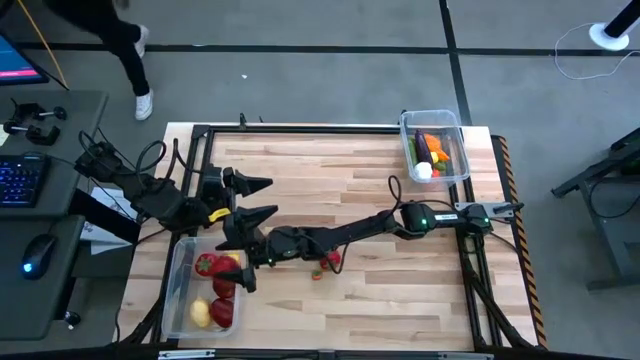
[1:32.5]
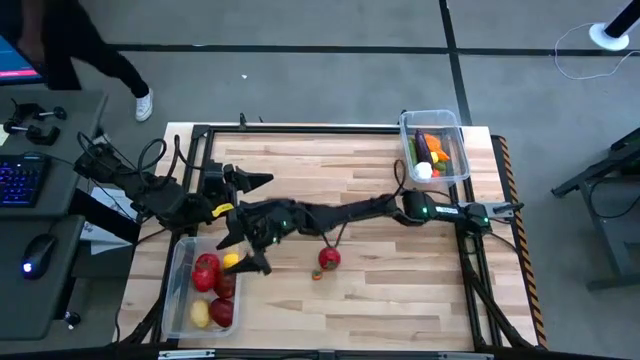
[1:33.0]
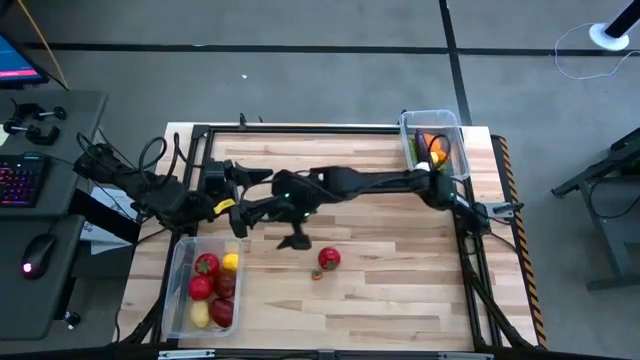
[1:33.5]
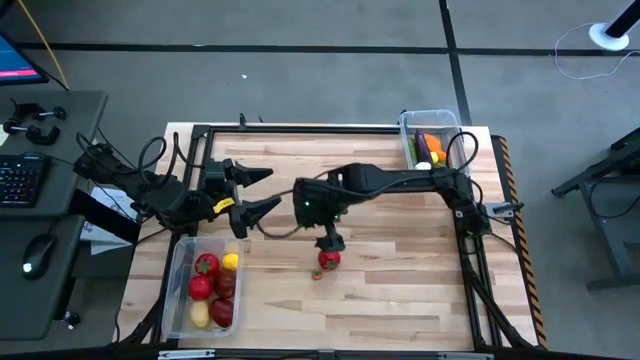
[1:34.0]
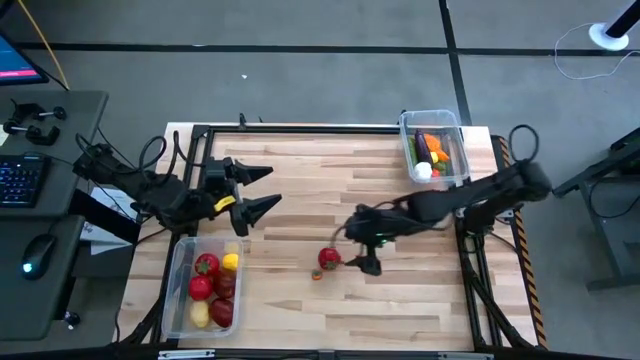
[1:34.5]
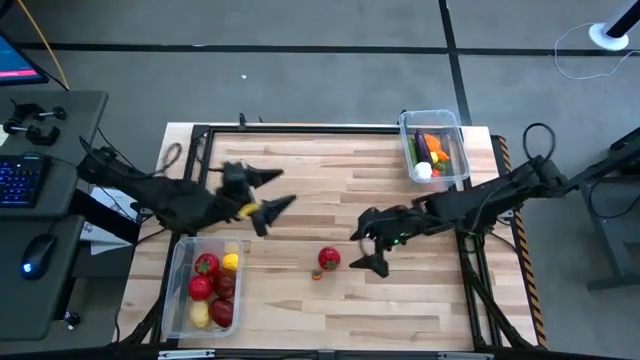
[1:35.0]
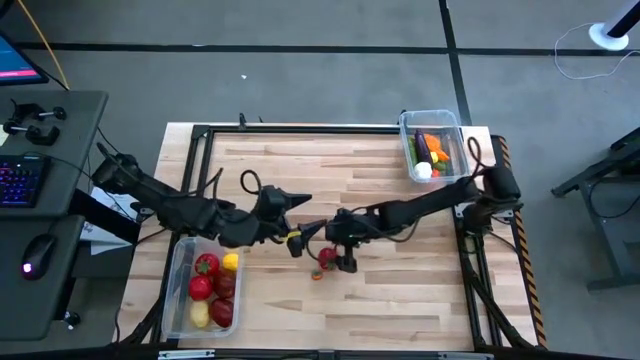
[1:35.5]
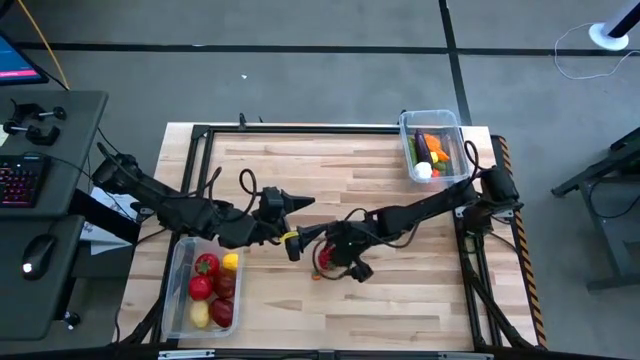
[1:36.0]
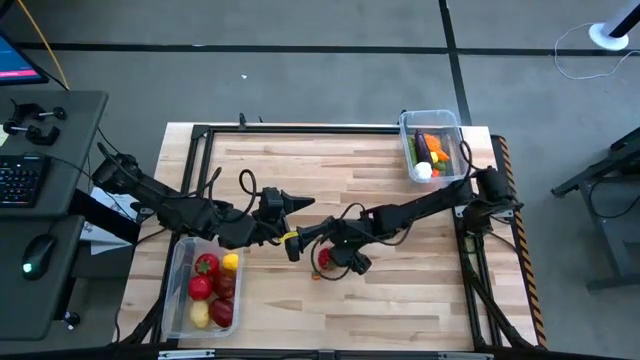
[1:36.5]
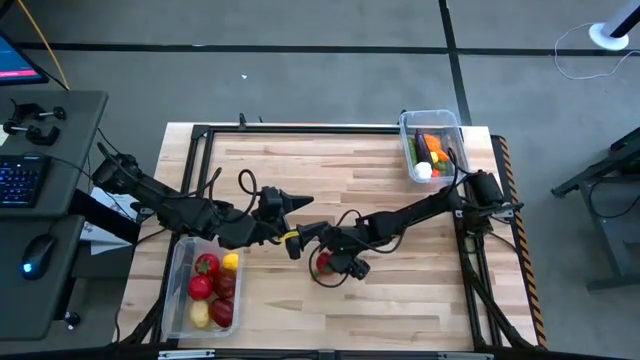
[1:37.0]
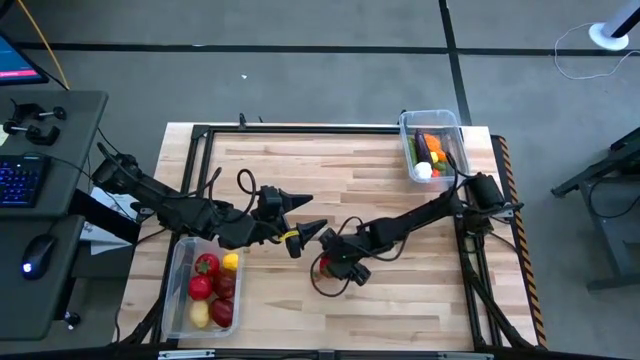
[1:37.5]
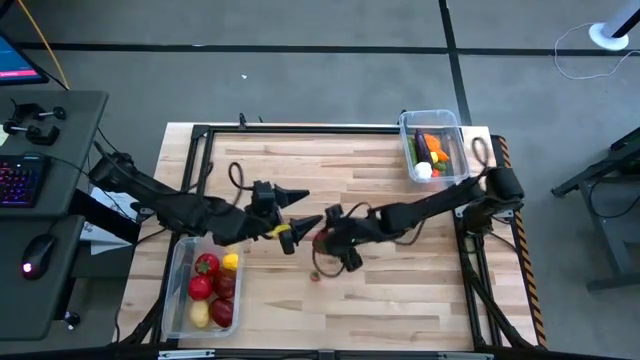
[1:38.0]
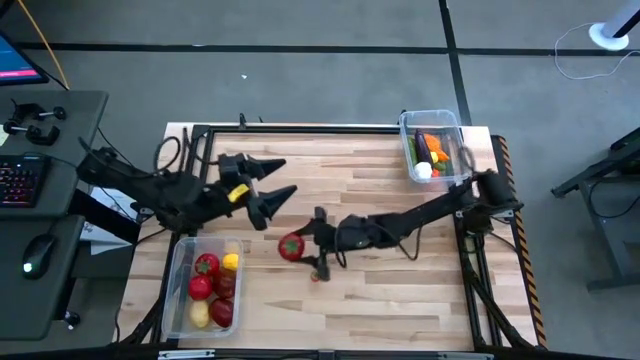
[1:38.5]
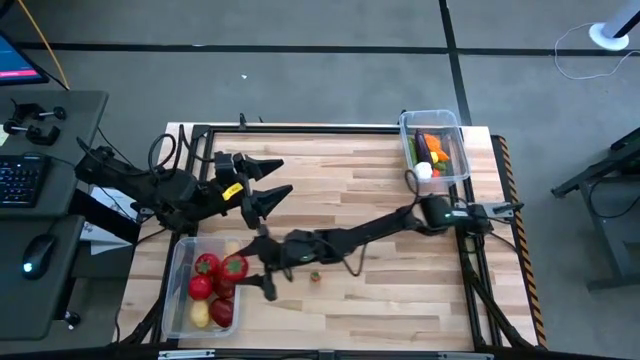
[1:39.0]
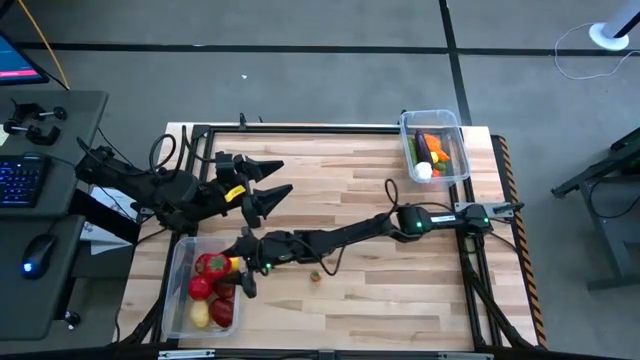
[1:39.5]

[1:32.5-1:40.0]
Task: Sort produce into baskets
Put the red tomato into the bottom transparent bin

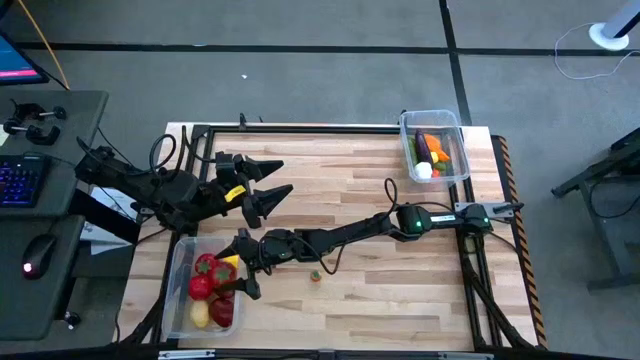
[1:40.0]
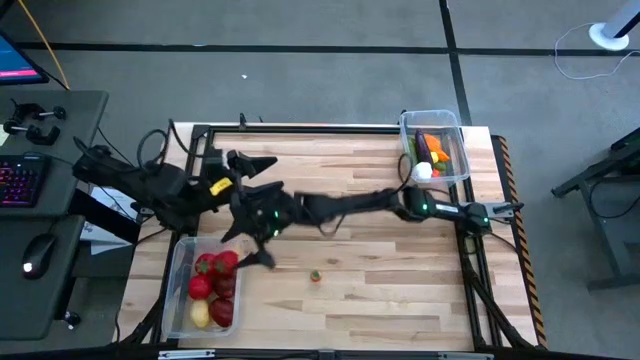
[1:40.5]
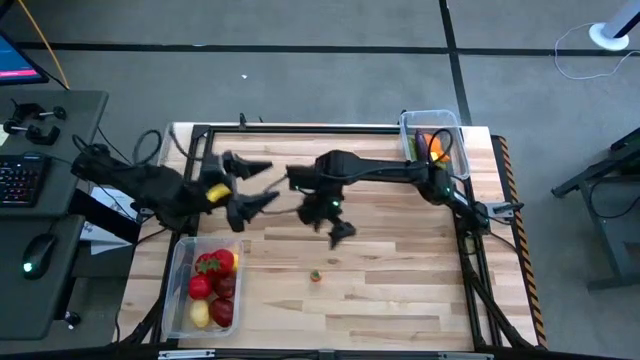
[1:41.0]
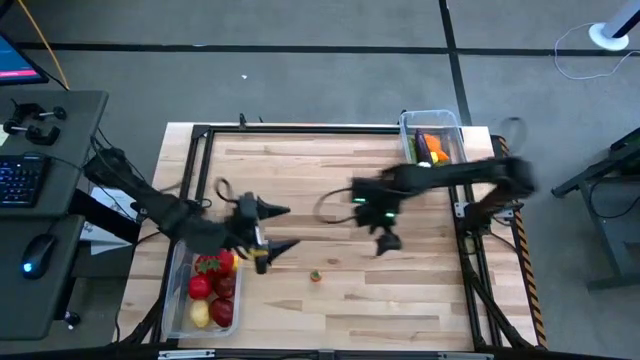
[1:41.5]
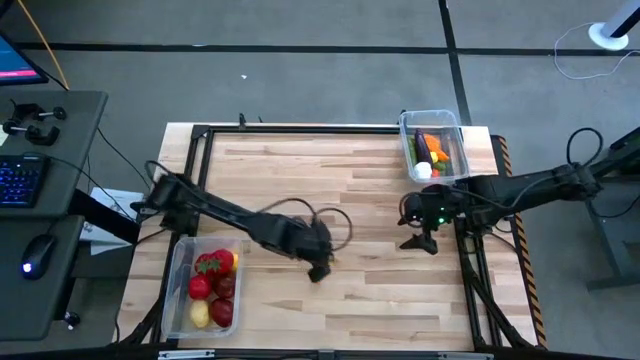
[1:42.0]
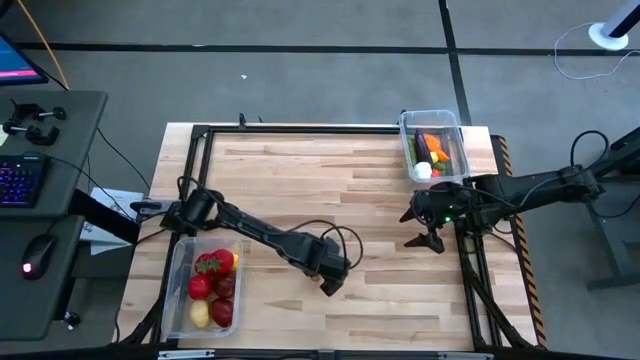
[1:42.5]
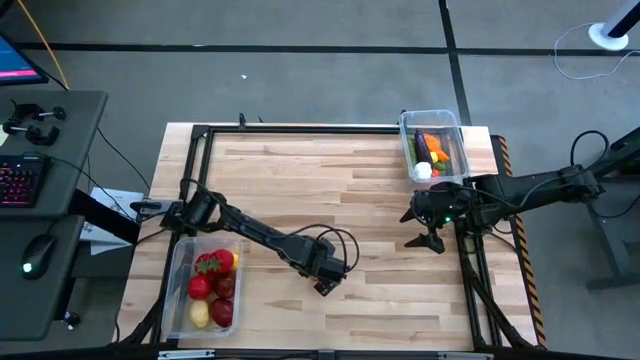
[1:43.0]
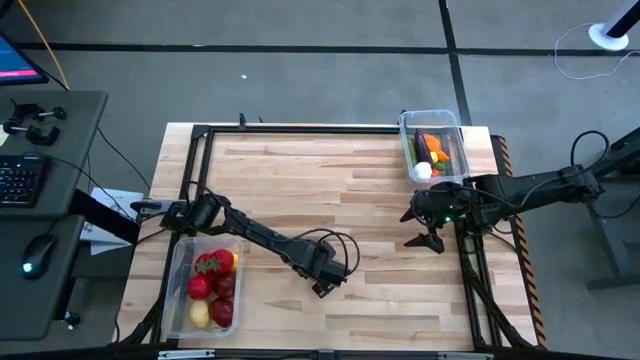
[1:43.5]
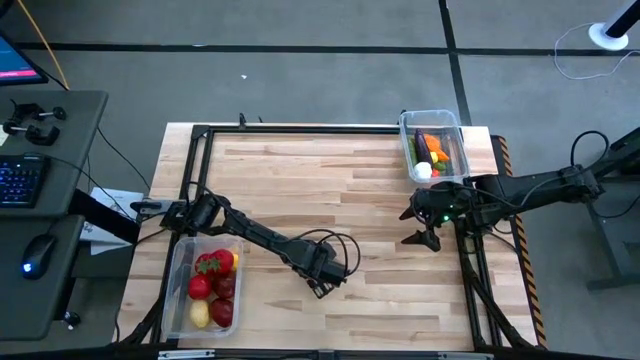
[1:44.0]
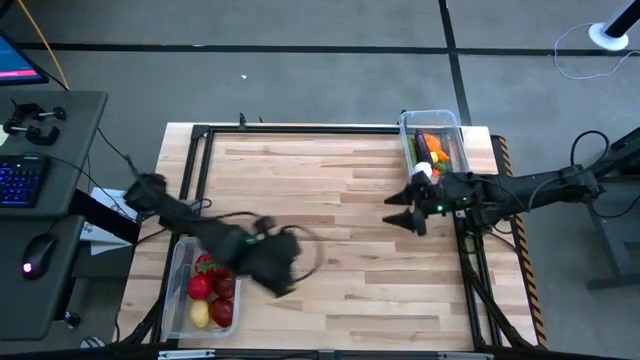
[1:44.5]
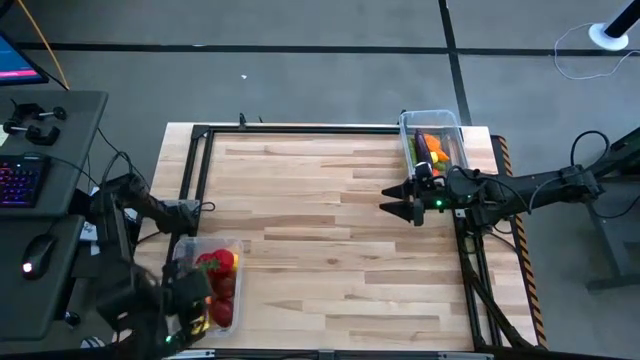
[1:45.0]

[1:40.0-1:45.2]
Put the orange peach into the bottom transparent bin

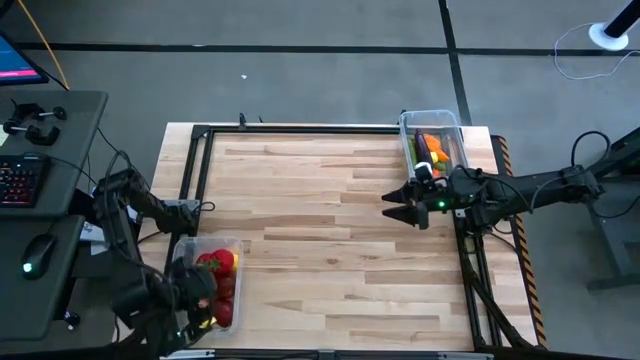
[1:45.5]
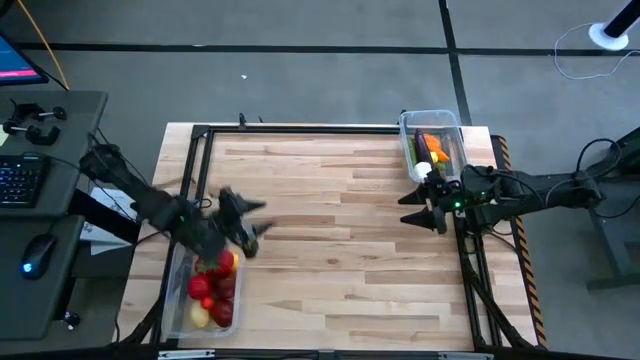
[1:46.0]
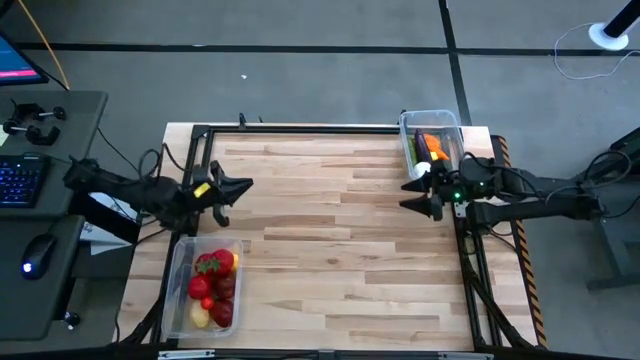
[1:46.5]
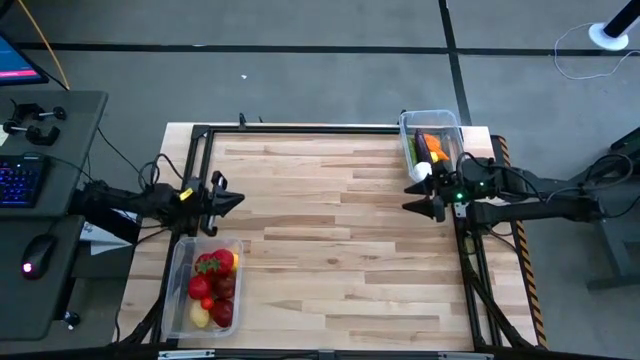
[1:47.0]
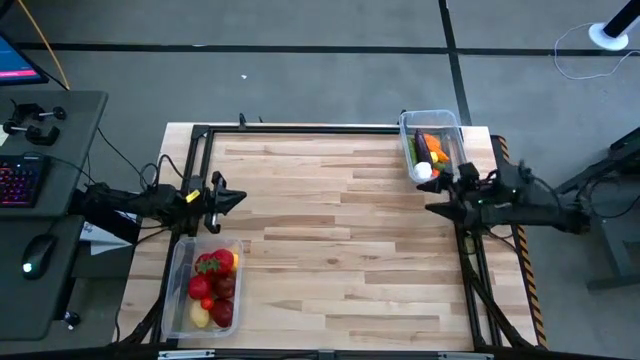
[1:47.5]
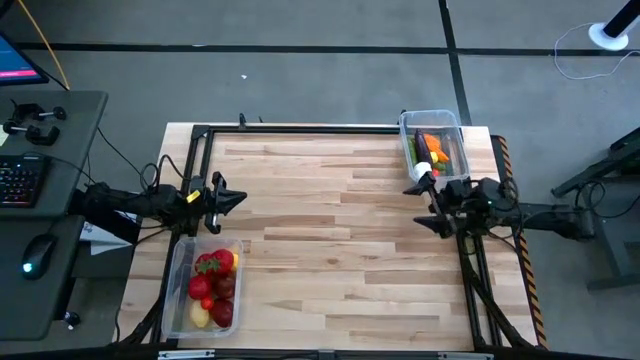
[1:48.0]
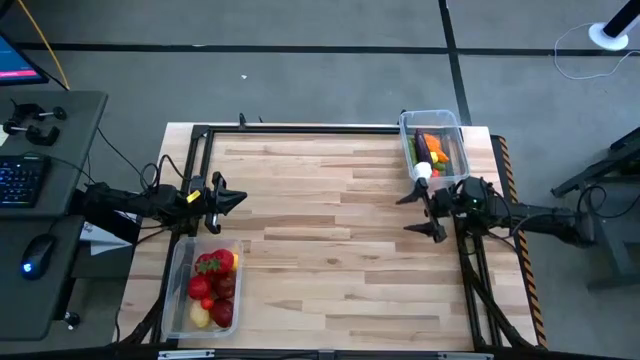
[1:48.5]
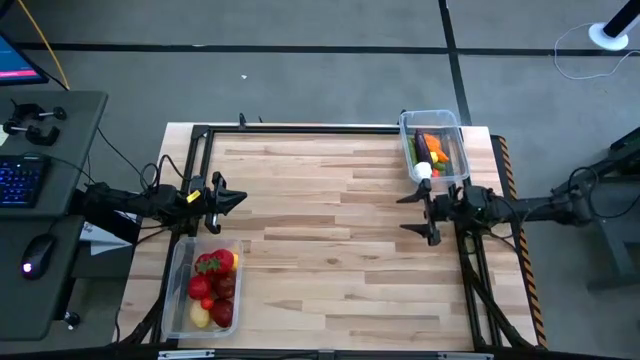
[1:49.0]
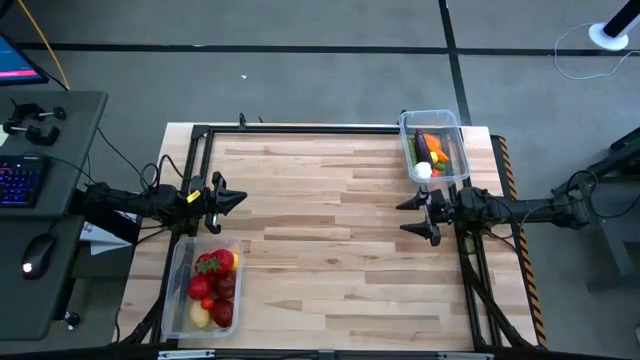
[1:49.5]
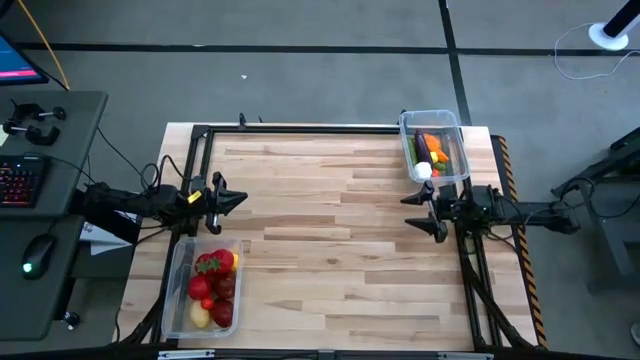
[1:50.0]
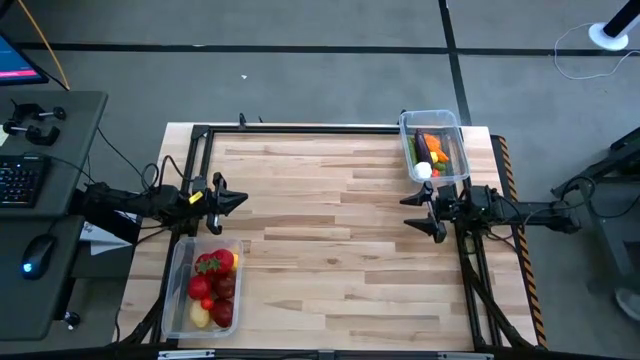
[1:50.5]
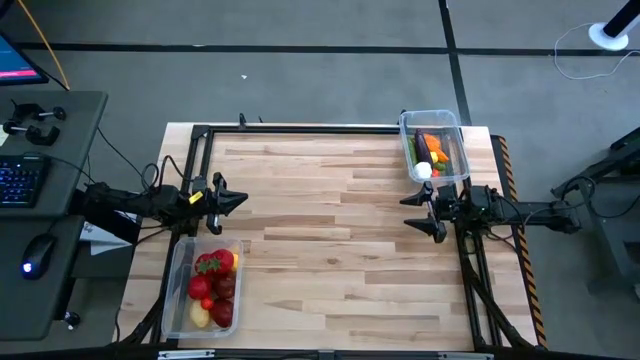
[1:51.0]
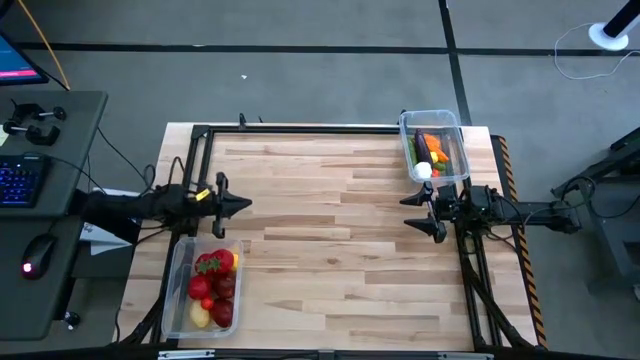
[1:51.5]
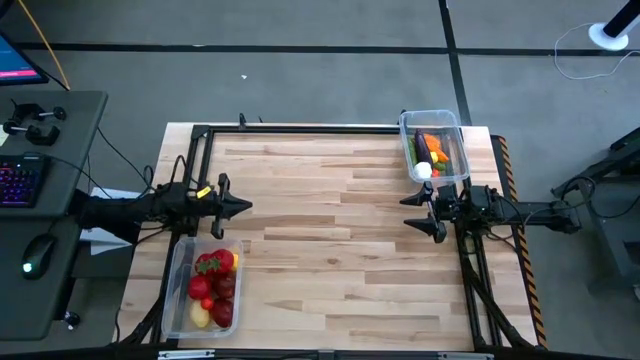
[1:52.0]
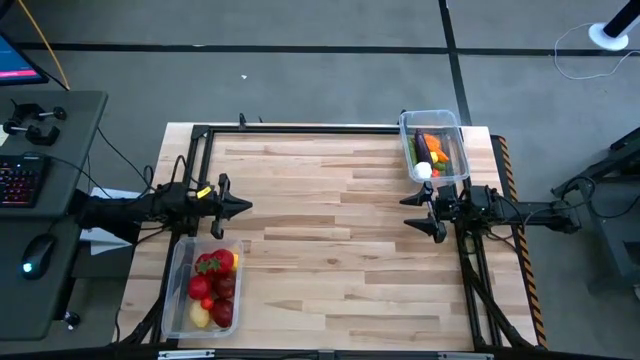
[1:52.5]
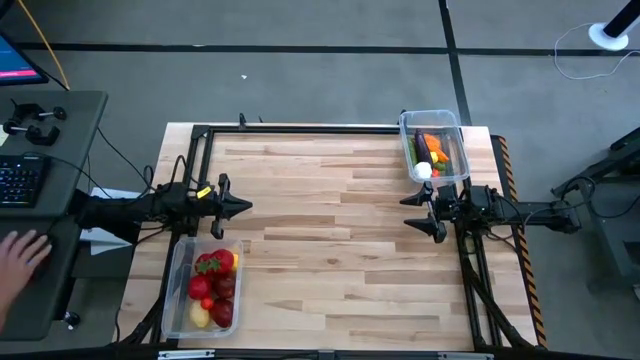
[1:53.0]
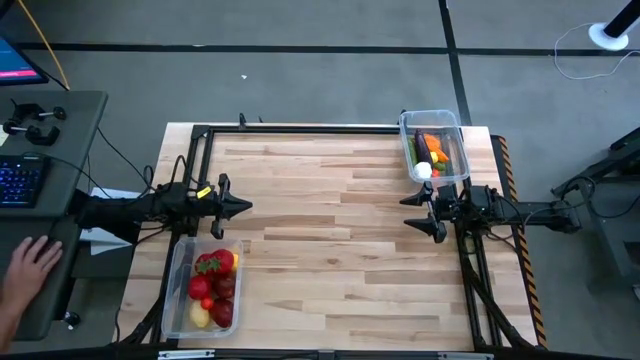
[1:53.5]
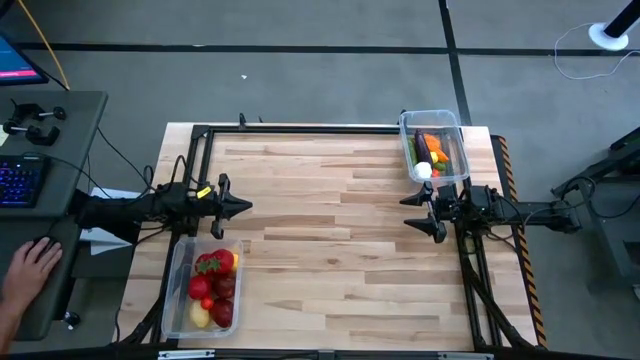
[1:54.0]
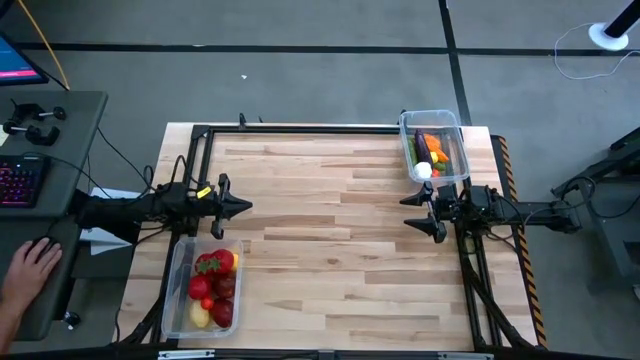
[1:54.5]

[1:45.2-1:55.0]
Return to Home Position
